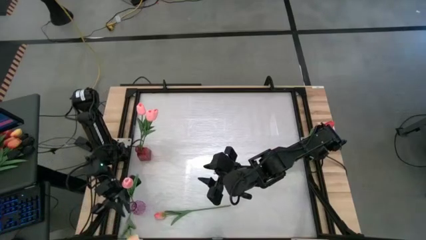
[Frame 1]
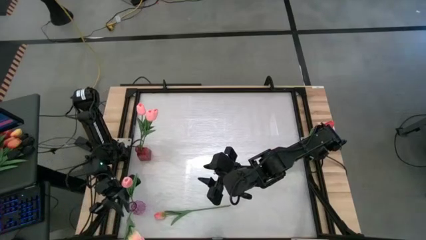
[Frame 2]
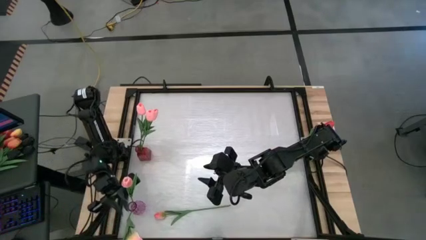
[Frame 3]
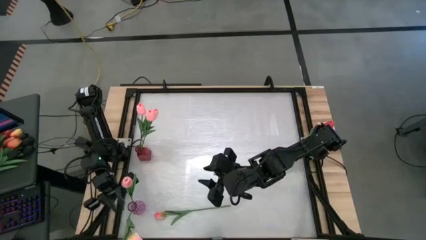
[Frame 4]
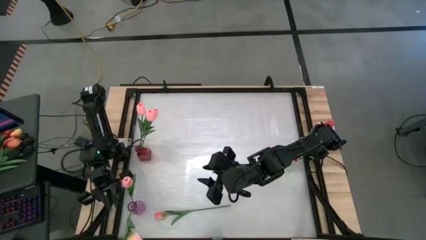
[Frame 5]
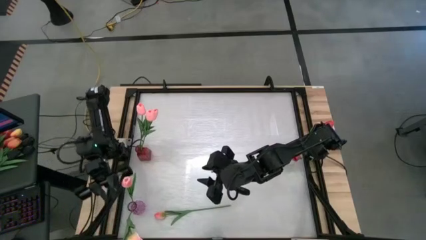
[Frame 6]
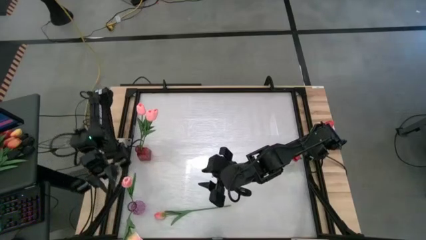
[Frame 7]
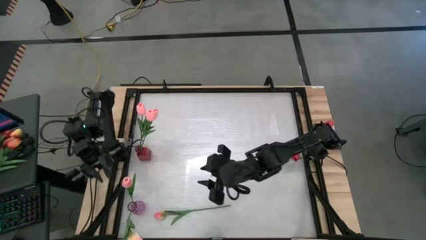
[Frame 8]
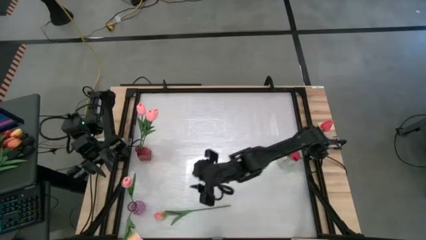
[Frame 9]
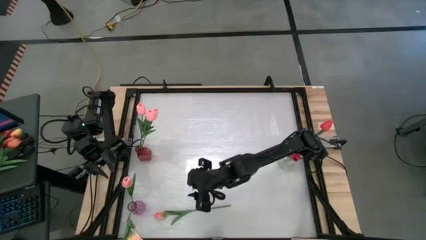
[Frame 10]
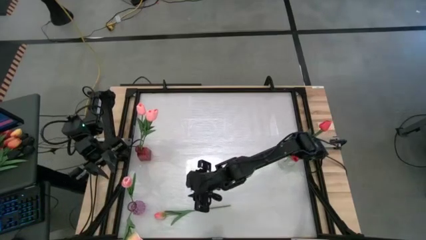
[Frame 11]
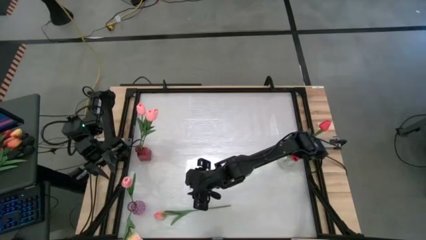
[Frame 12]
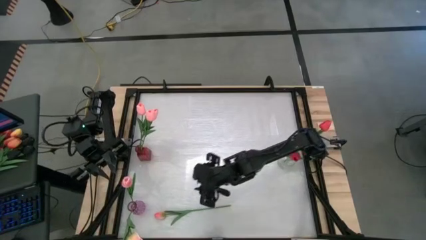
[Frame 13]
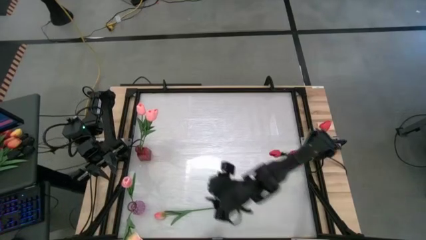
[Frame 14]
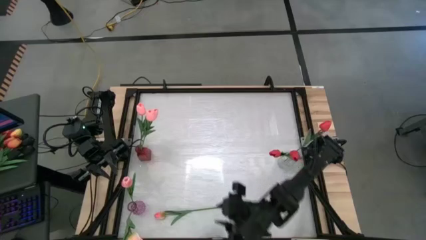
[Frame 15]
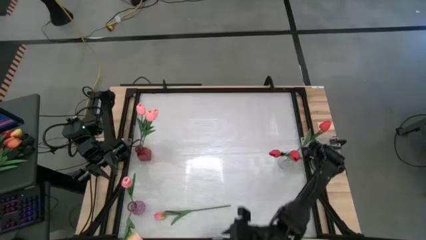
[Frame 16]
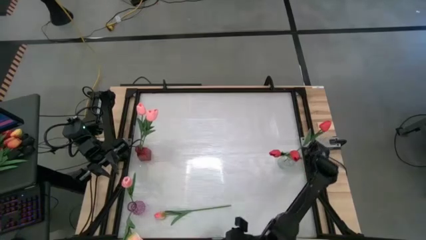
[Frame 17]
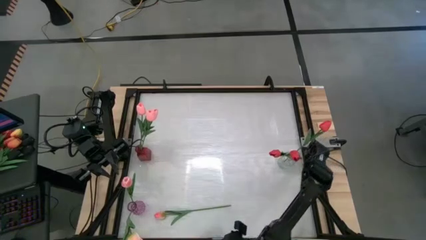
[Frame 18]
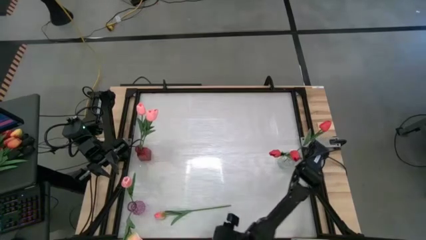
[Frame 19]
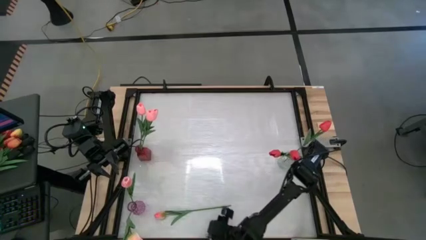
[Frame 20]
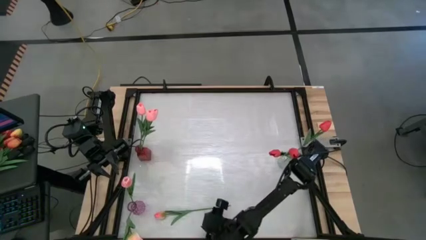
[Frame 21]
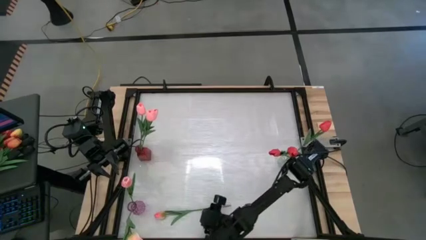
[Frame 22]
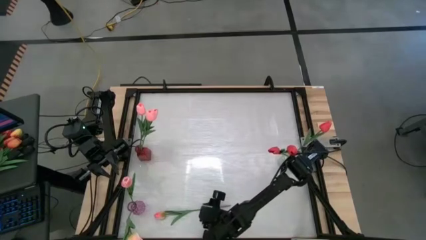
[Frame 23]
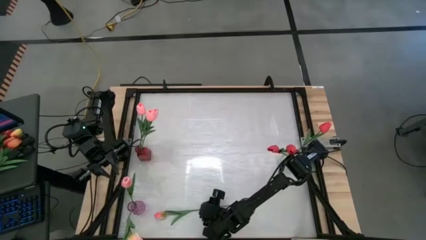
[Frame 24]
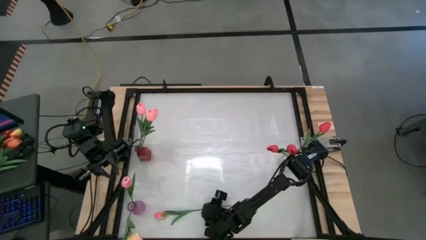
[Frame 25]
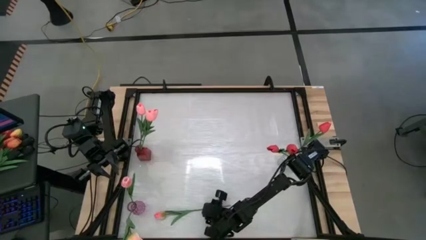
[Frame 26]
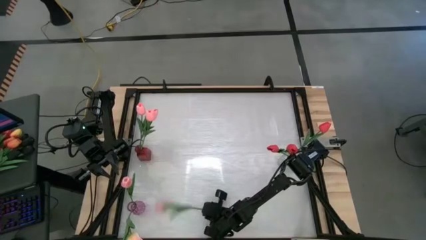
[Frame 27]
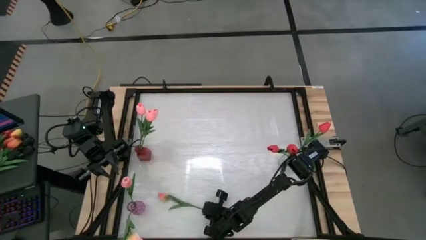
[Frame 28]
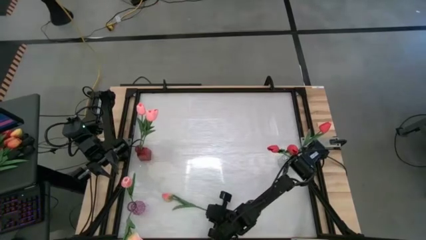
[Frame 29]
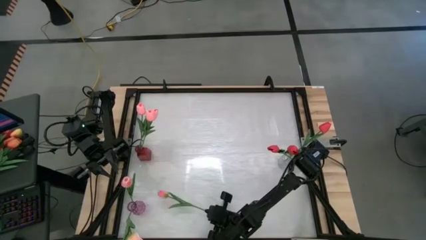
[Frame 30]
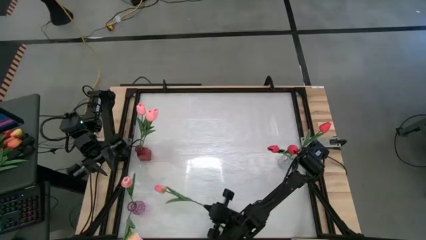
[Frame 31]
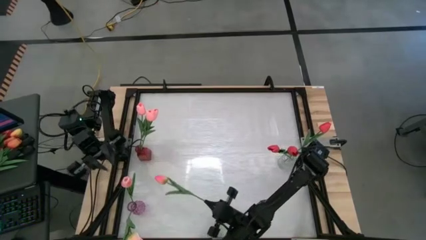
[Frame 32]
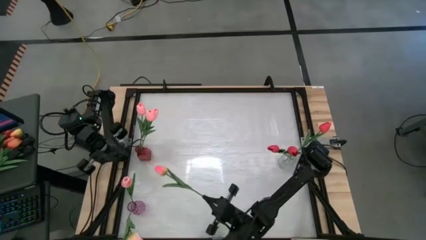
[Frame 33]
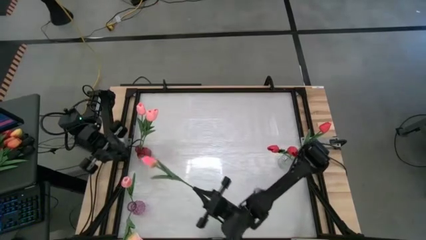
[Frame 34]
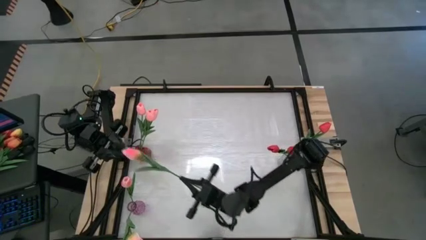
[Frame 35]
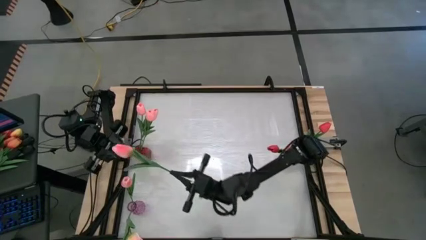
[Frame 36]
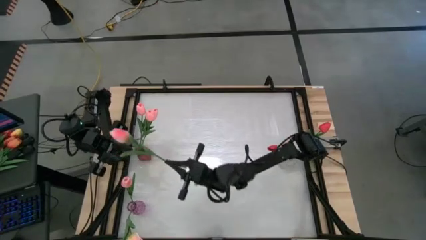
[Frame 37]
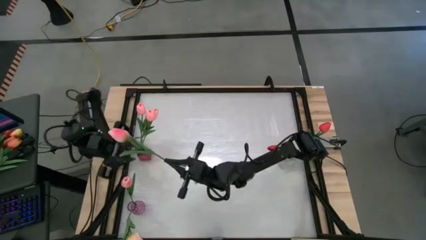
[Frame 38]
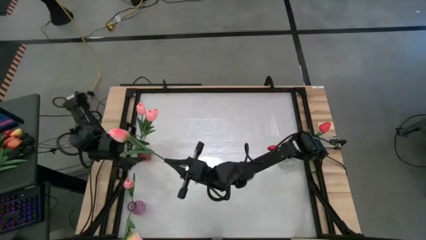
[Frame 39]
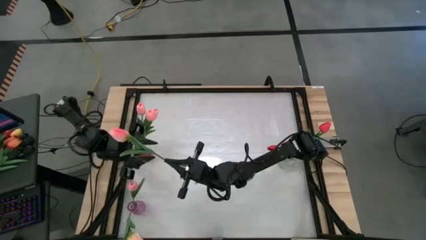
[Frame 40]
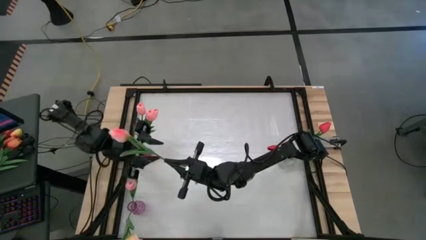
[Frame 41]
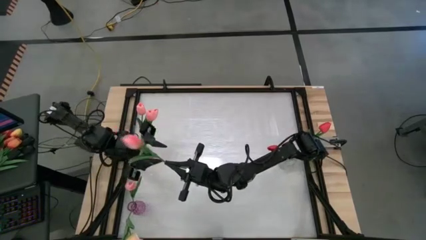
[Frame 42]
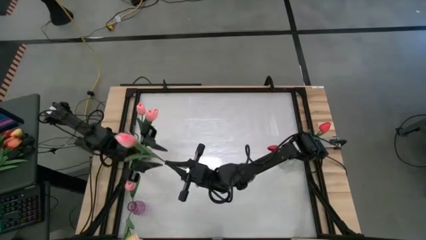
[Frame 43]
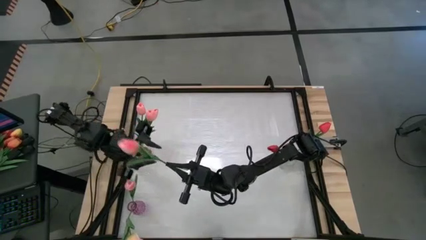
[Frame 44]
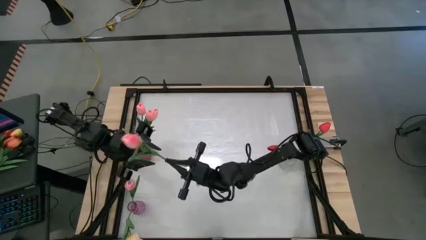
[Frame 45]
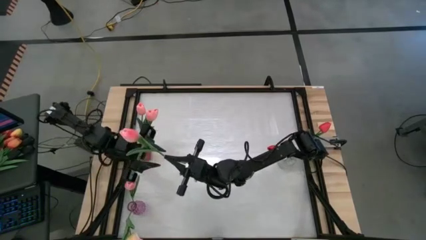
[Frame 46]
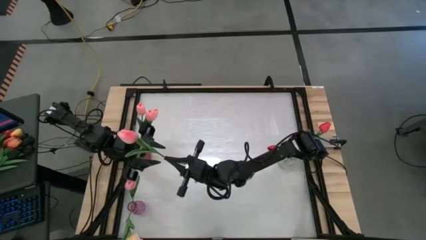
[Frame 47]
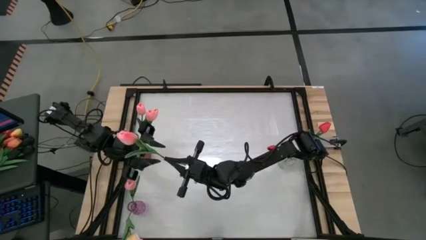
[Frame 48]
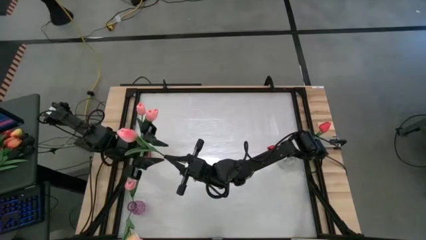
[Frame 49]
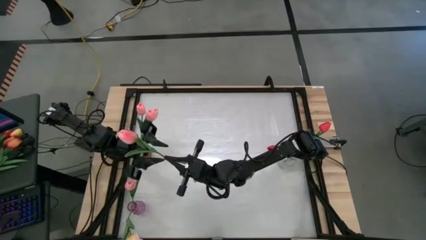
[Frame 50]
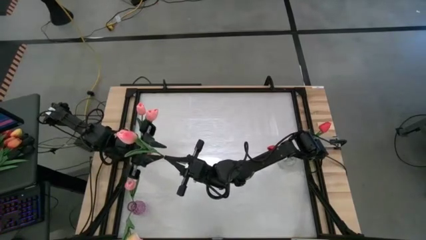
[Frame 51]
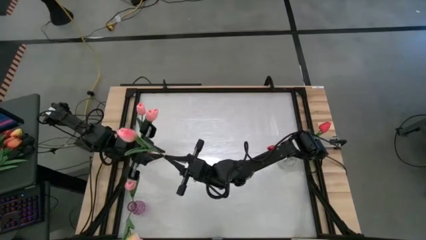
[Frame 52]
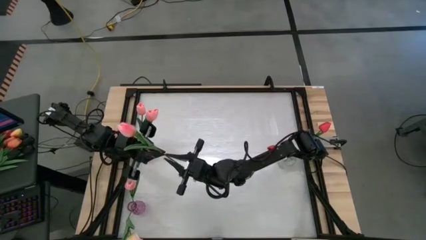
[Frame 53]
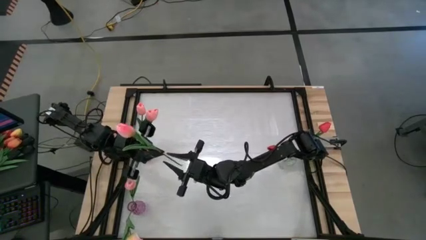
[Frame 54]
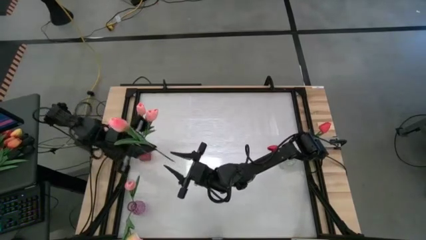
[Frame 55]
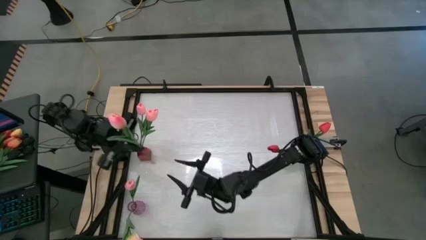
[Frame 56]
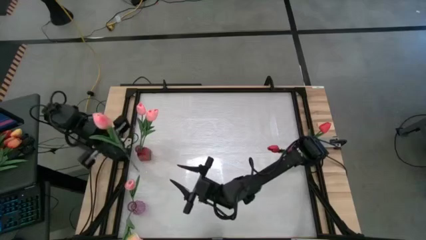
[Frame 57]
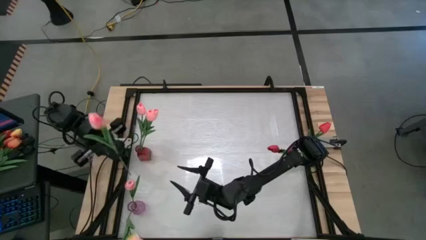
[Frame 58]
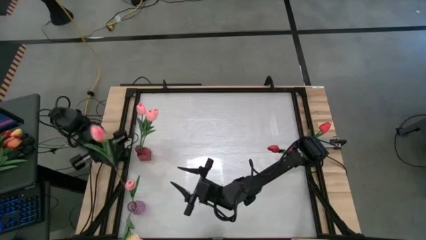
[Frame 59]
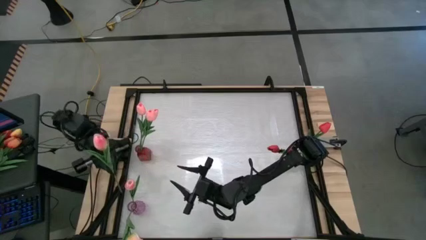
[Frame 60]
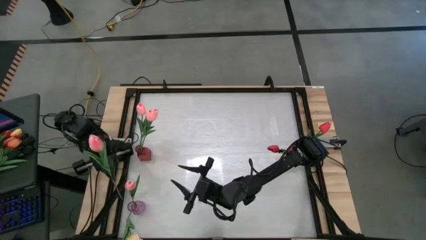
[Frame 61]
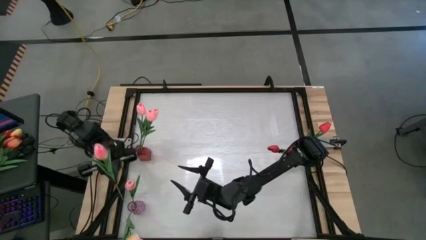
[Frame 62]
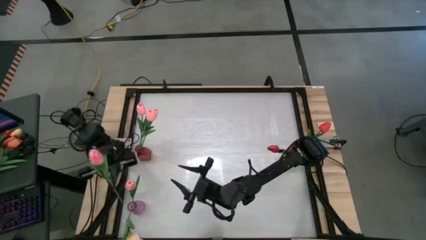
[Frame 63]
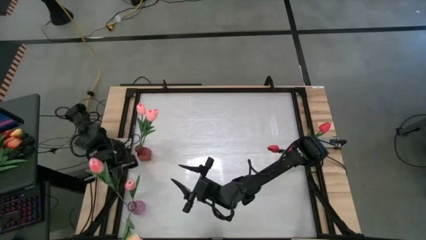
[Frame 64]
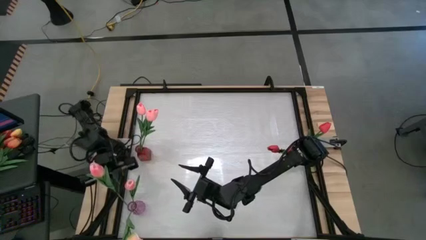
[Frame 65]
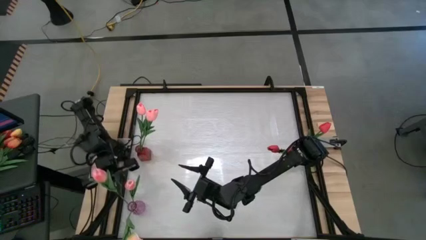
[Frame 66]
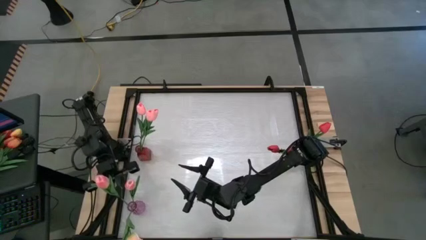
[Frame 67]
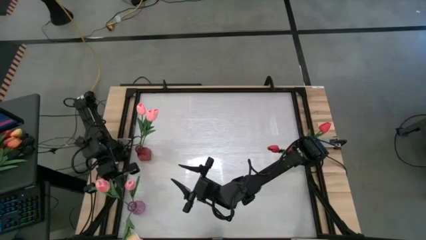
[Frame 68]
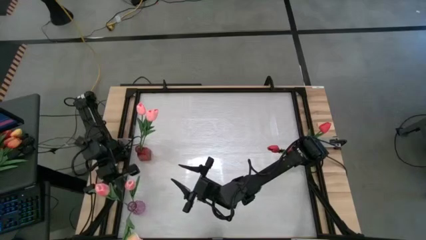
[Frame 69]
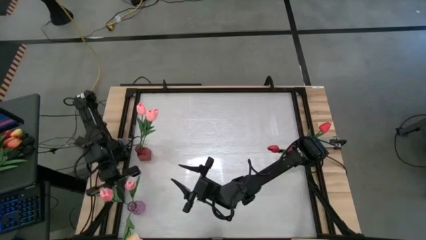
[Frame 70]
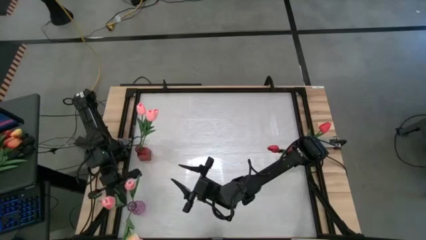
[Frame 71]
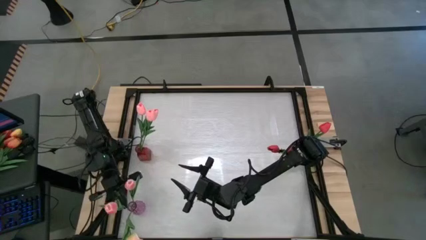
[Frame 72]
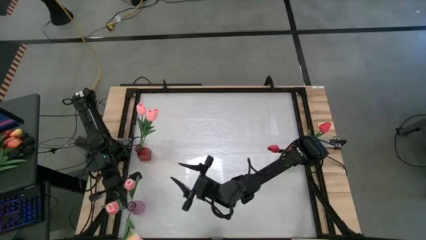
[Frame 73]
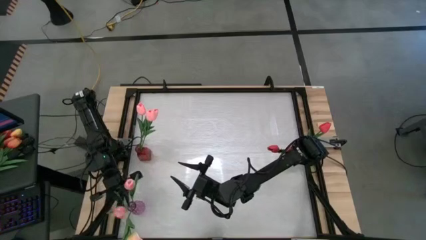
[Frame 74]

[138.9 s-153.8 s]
Task: Sort flowers into vase by color
Put the light pink flower into the purple flower vase
